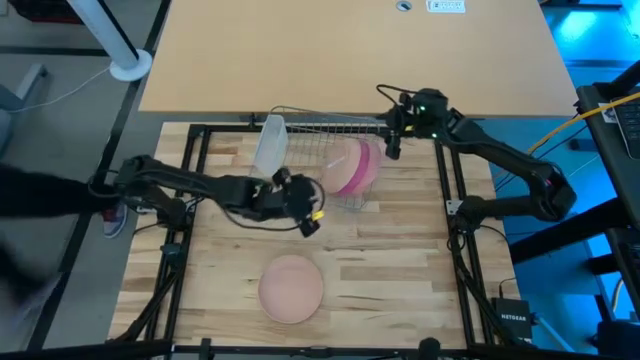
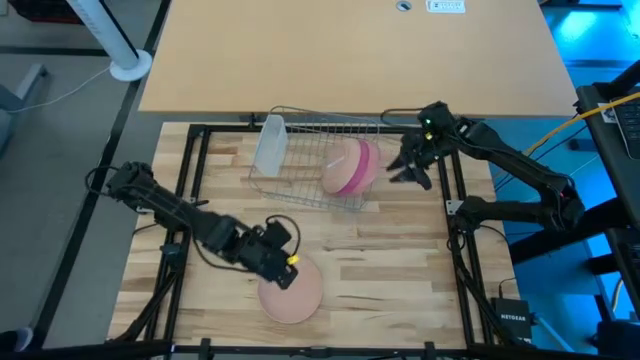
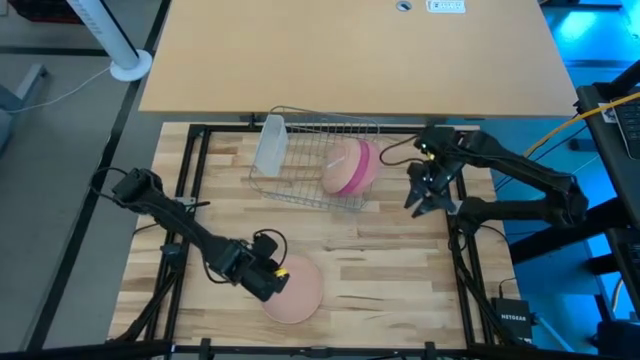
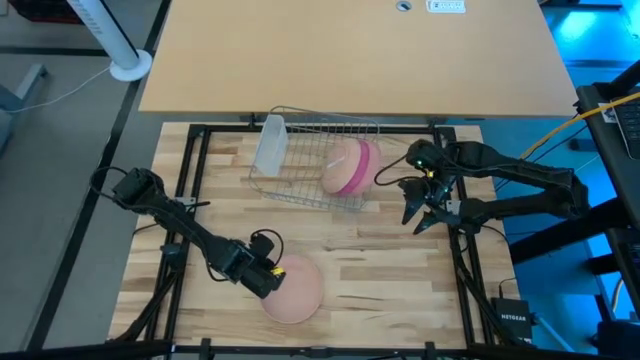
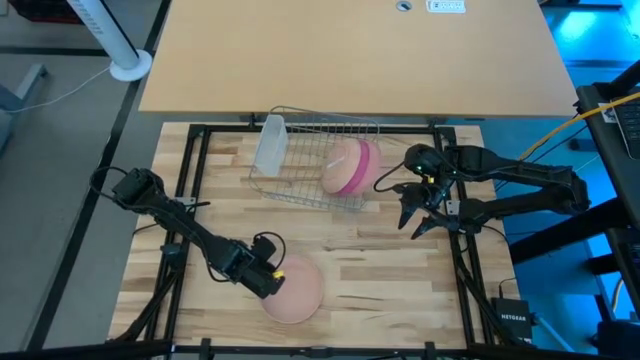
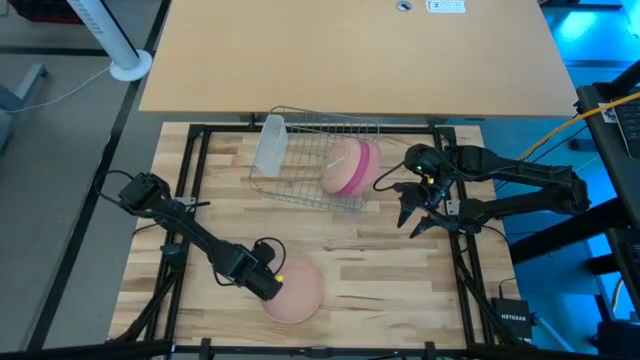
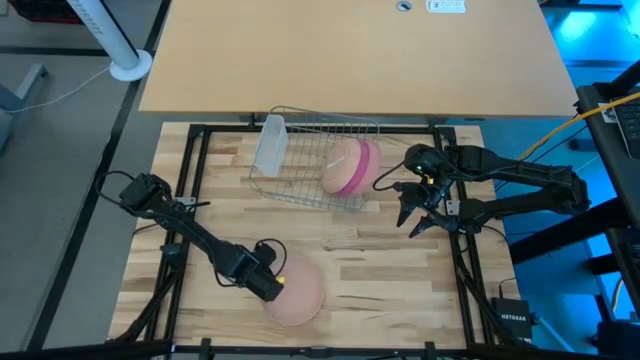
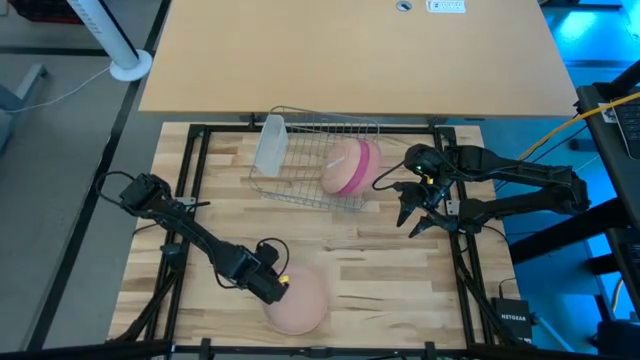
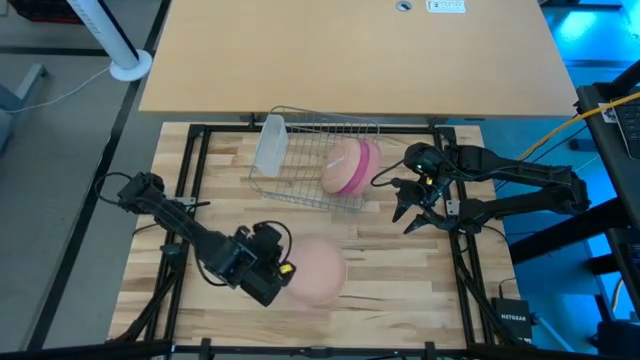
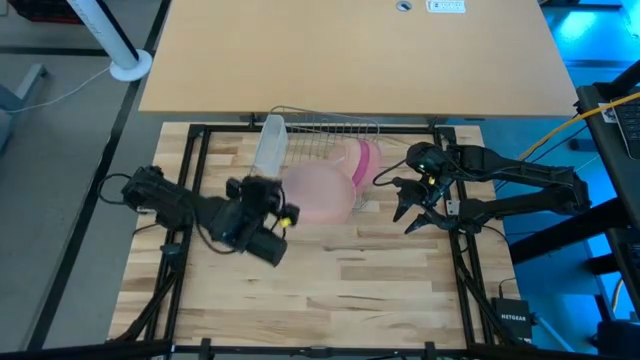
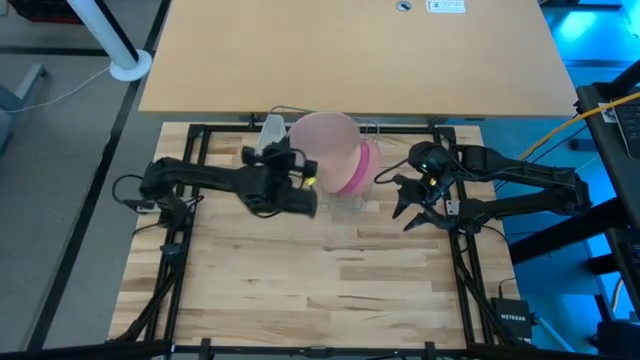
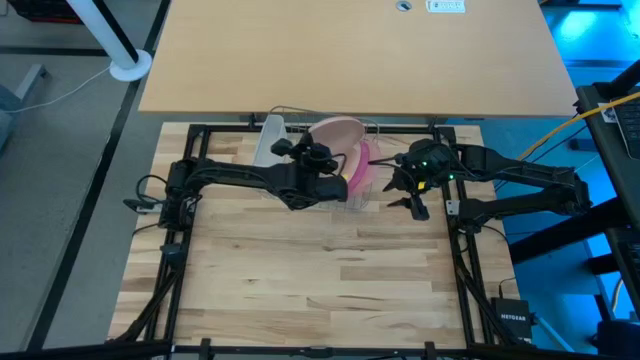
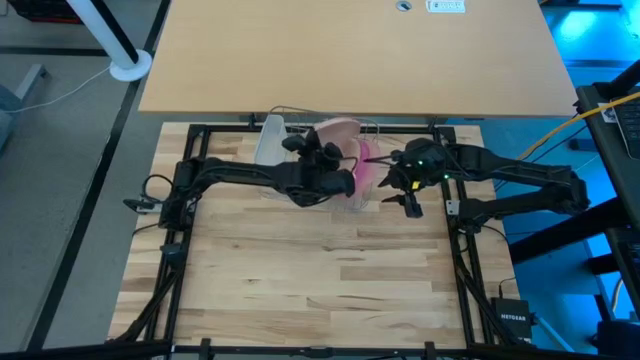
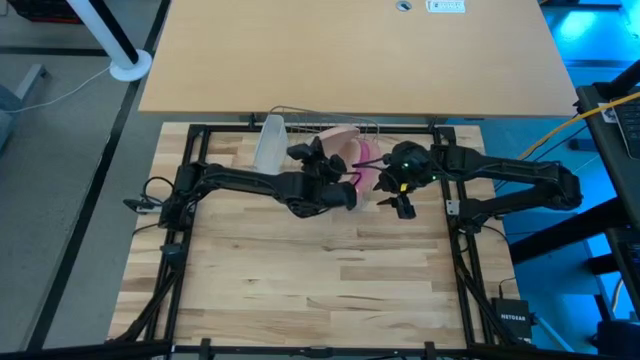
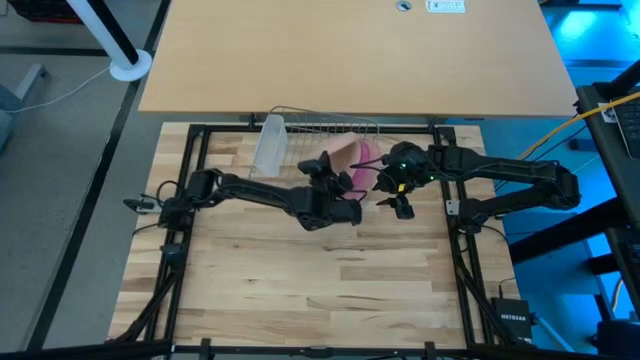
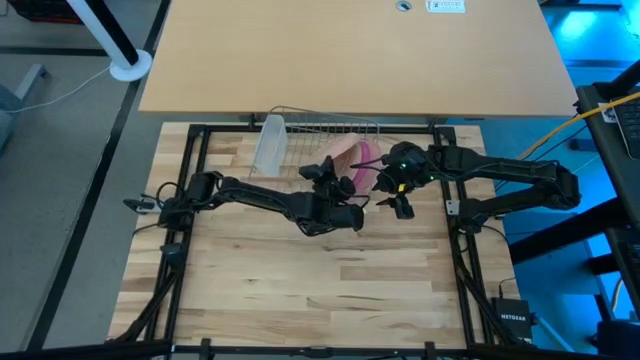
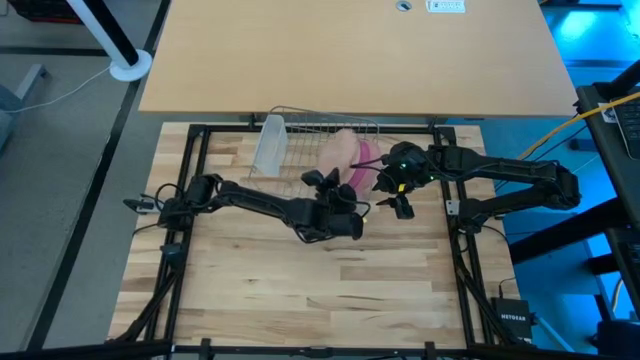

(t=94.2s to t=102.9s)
Task: Sort dishes
Put the light red plate into the dish rack

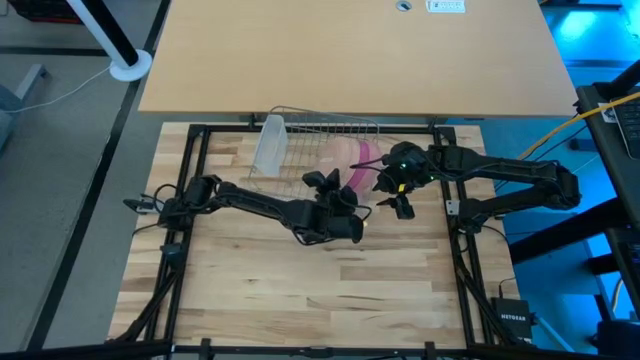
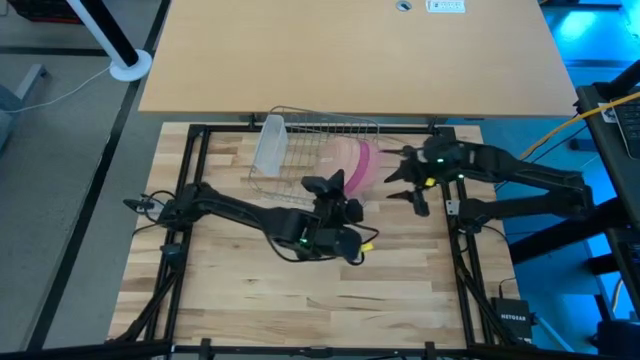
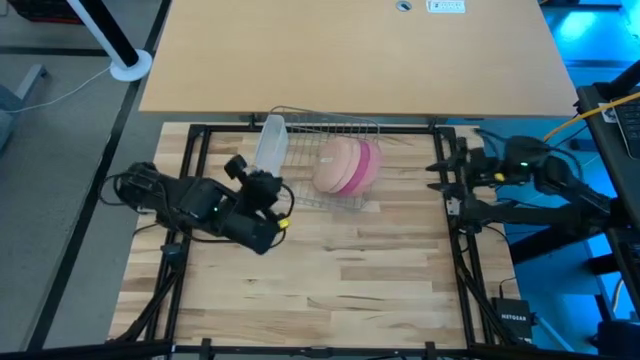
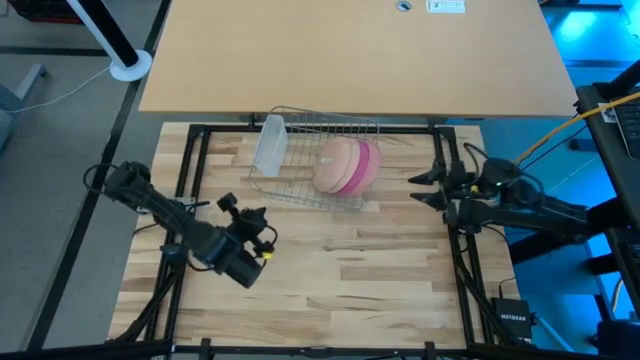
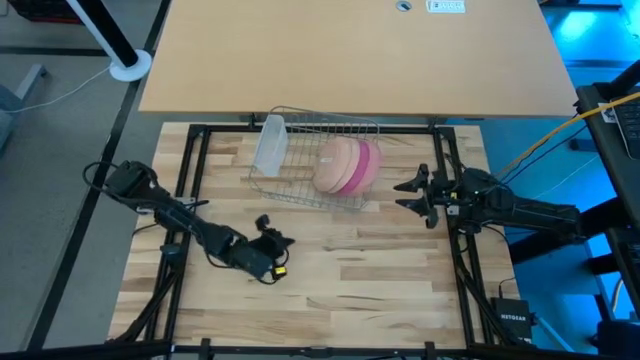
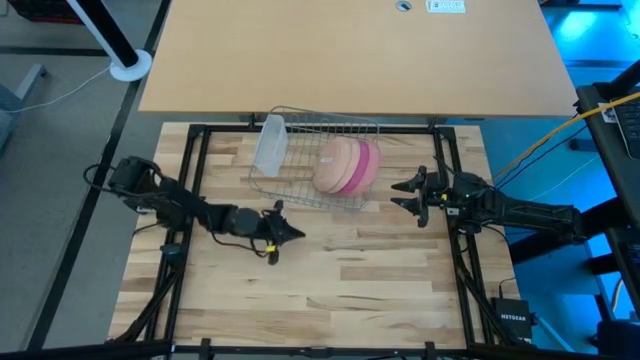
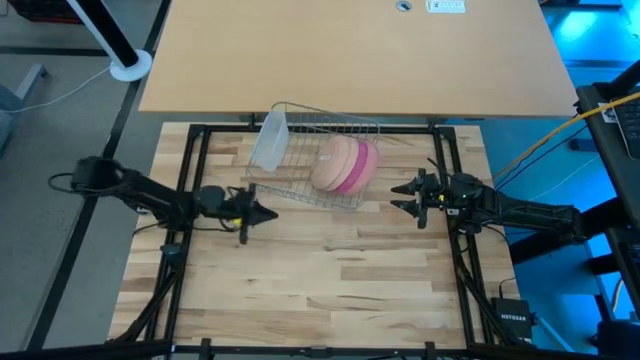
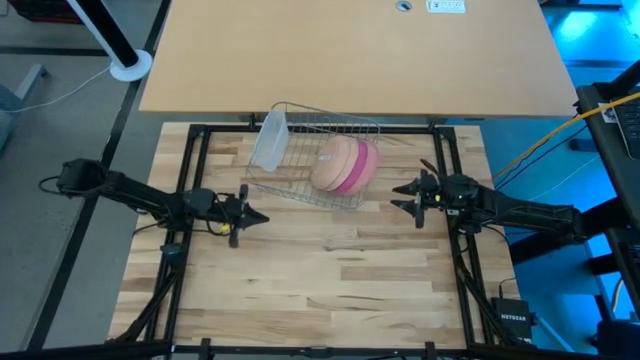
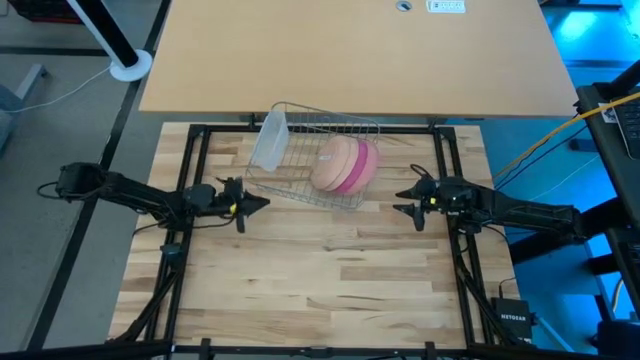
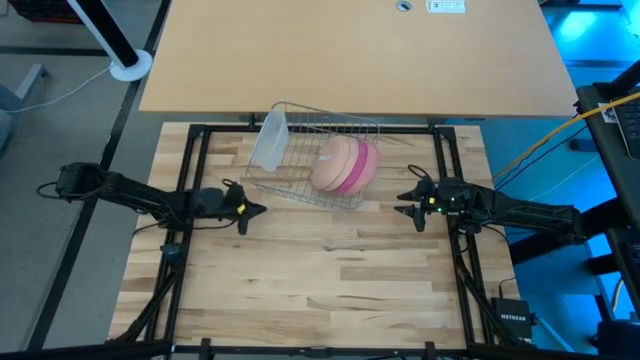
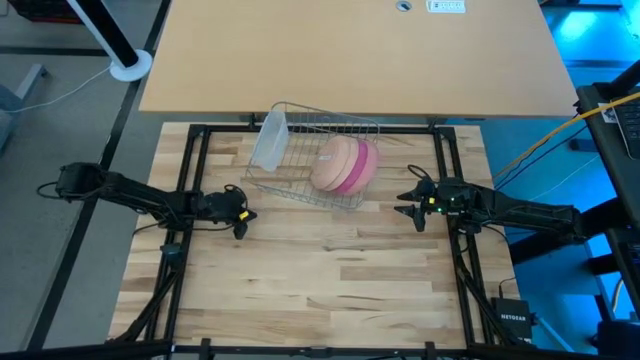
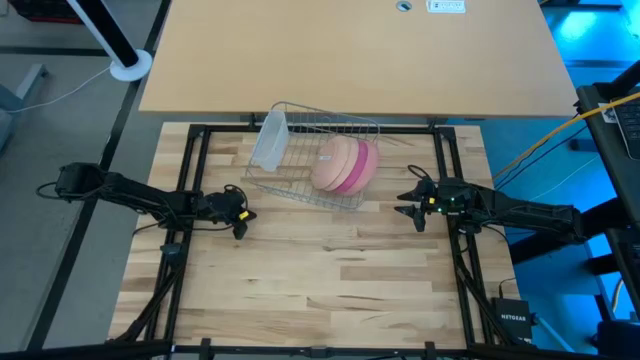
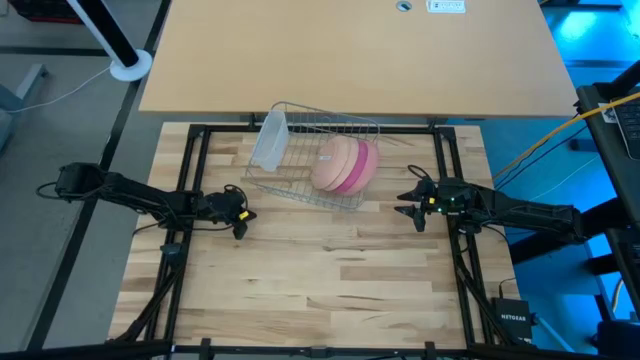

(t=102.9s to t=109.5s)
Return to Home Position

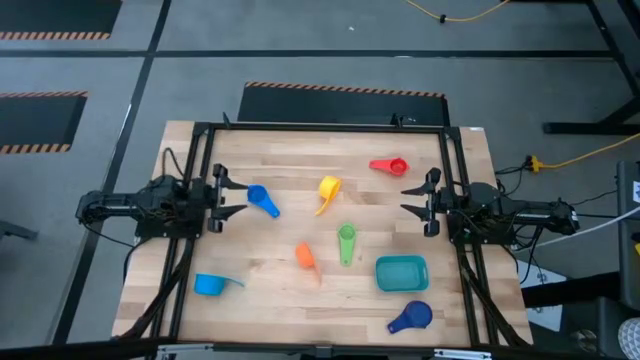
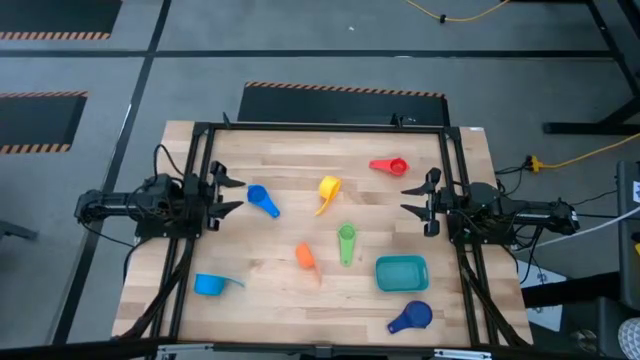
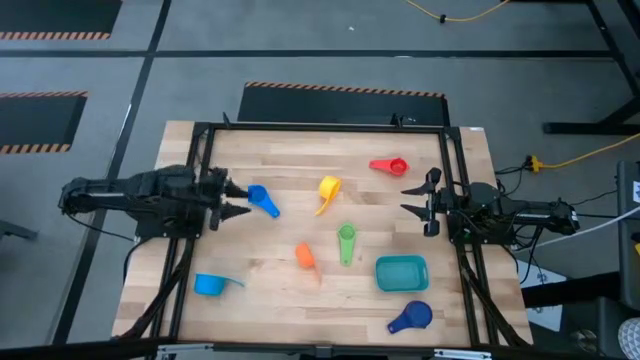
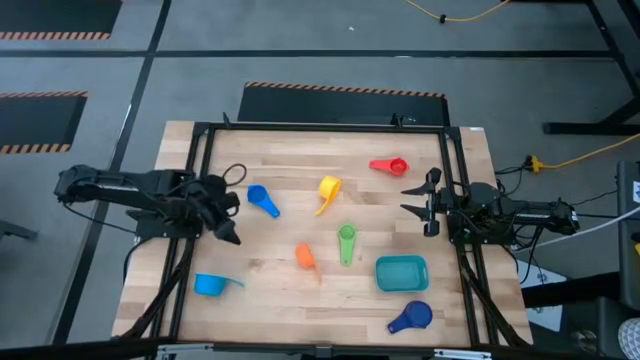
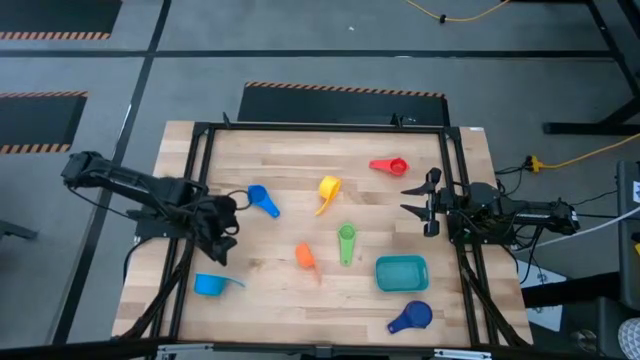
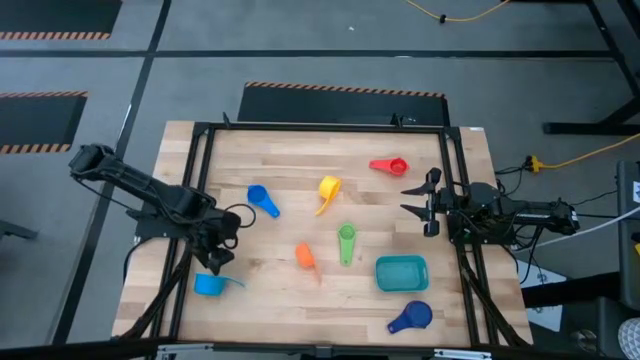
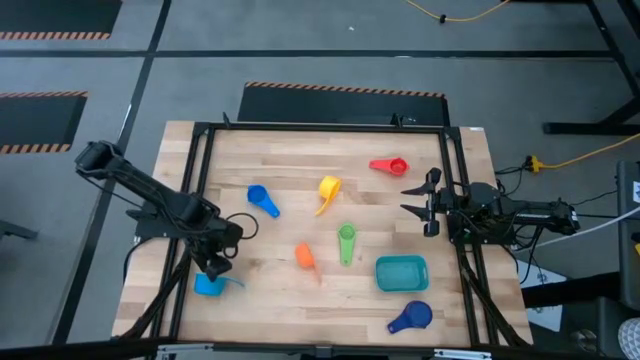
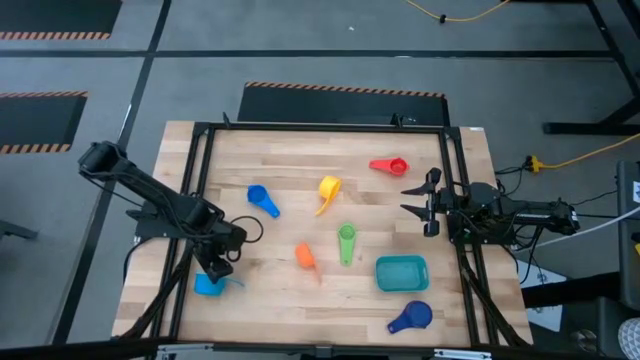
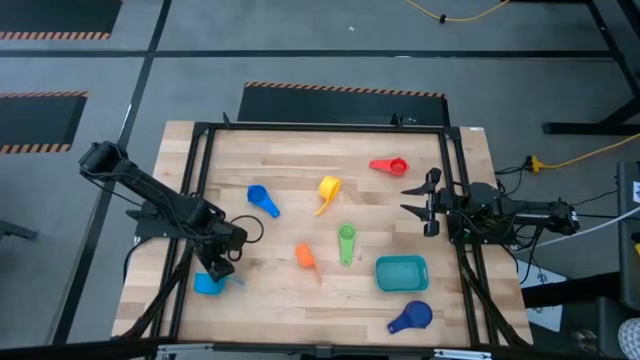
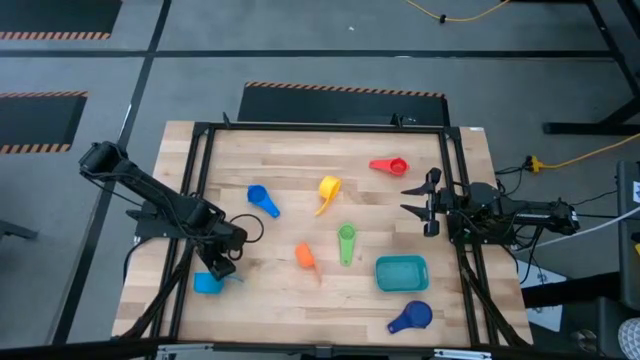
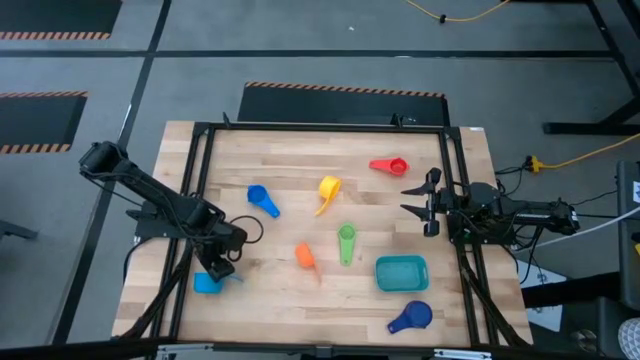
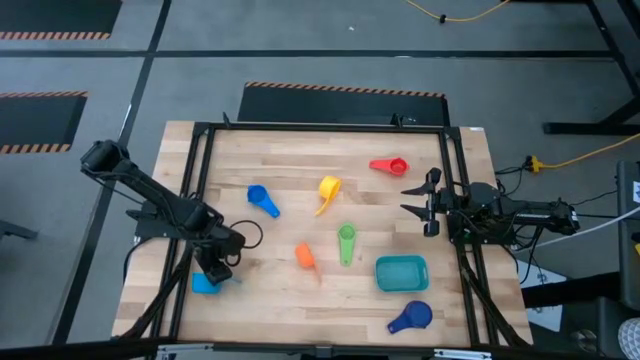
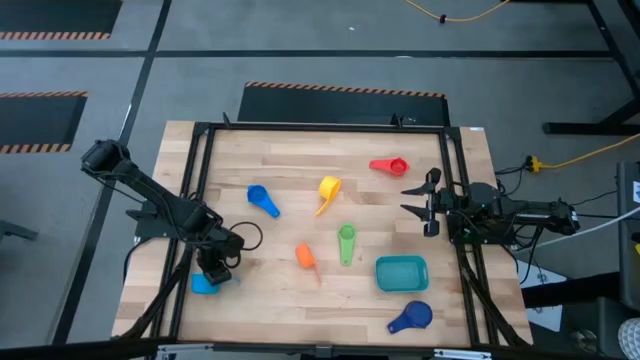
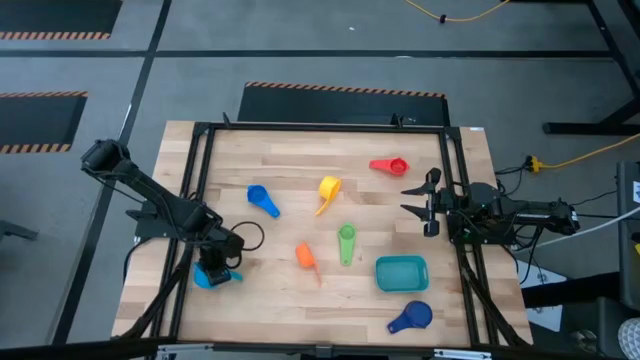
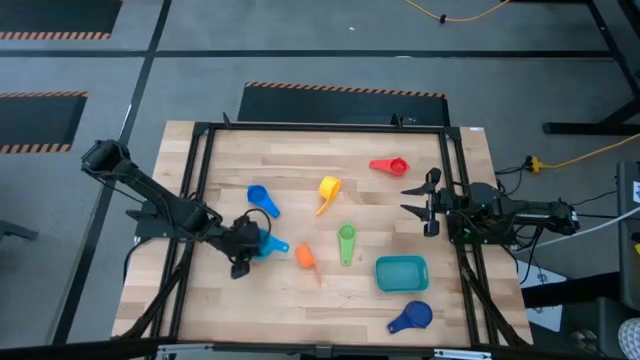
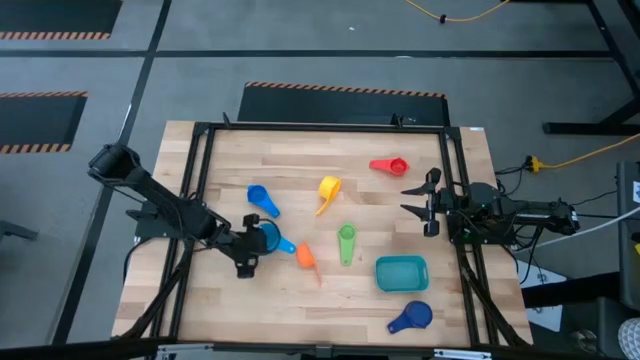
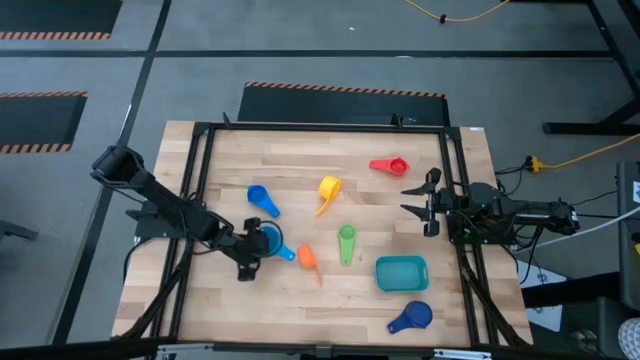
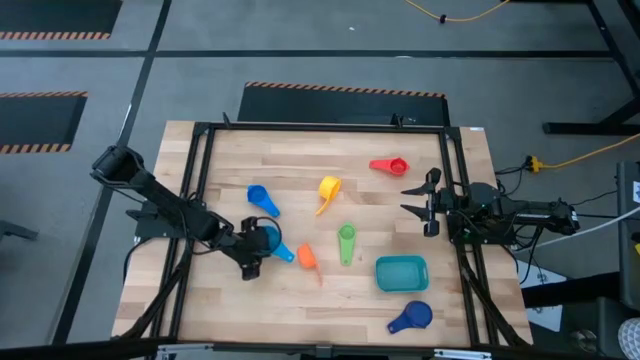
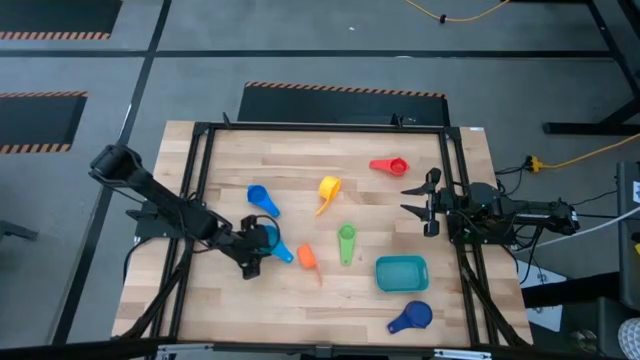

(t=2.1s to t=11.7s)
Task: Nest measuring cups in basket
Move the light blue measuring nest cup to the middle left of the table
